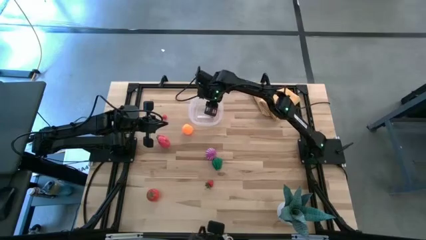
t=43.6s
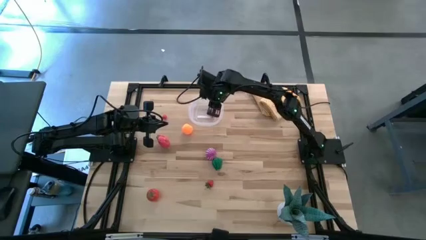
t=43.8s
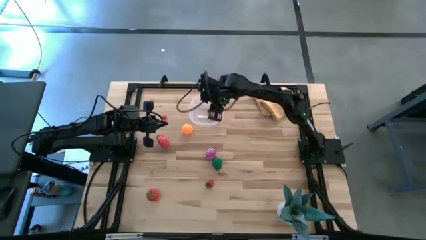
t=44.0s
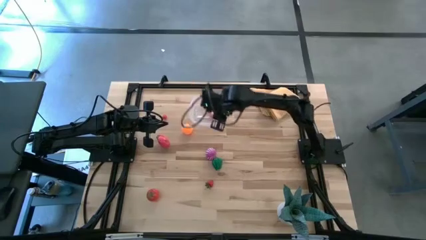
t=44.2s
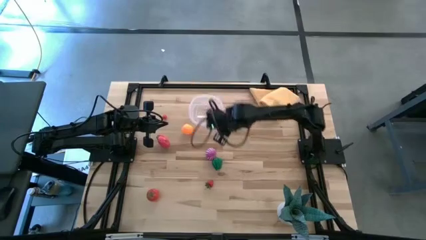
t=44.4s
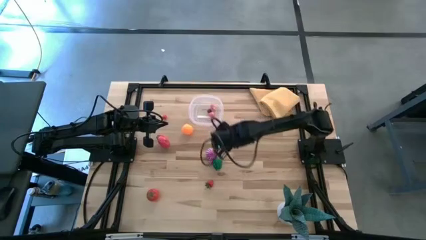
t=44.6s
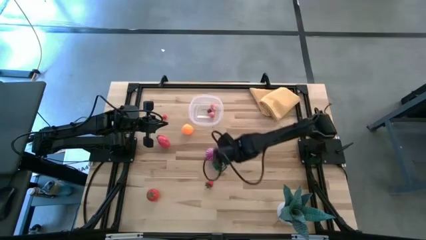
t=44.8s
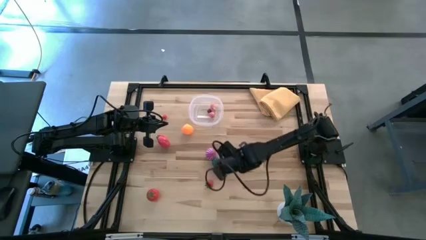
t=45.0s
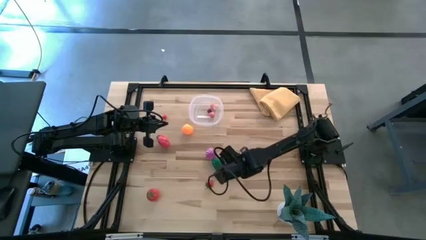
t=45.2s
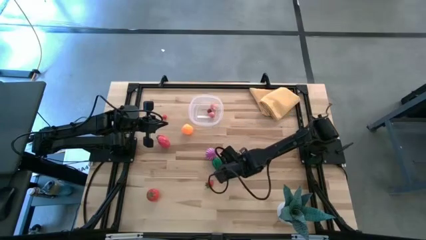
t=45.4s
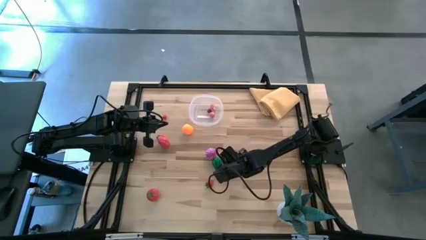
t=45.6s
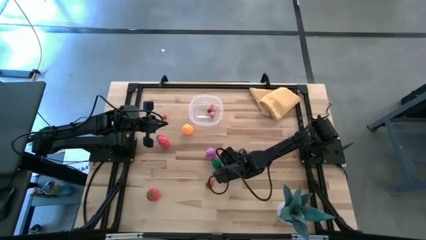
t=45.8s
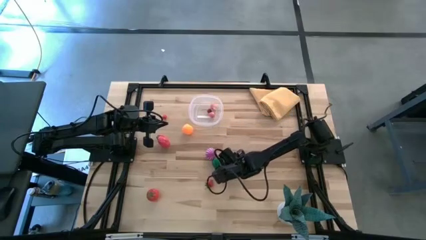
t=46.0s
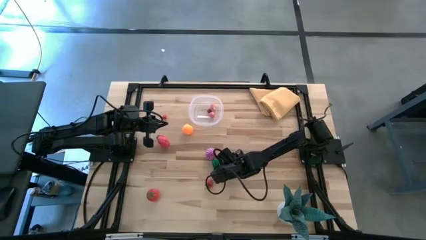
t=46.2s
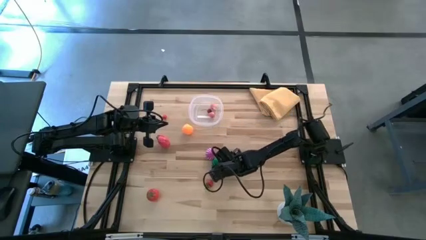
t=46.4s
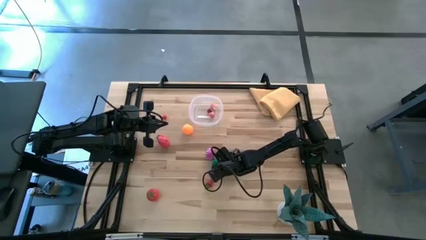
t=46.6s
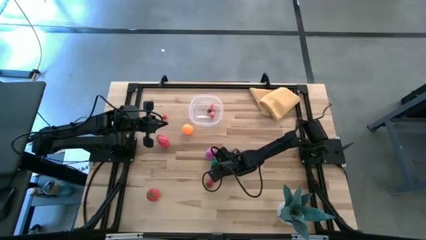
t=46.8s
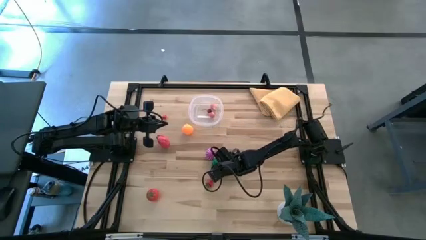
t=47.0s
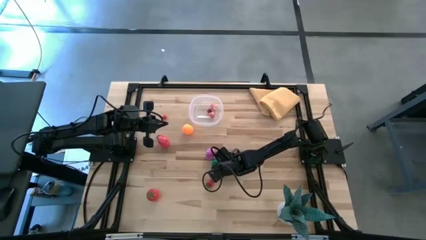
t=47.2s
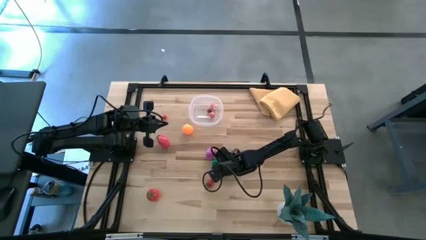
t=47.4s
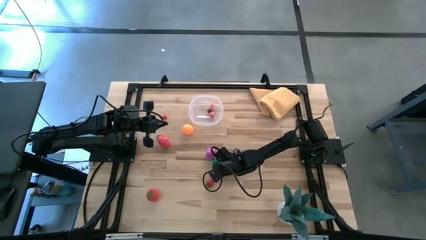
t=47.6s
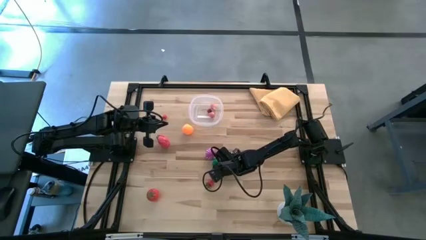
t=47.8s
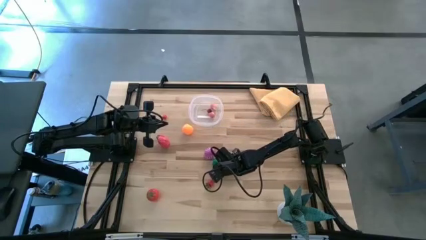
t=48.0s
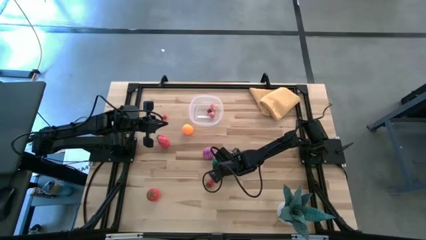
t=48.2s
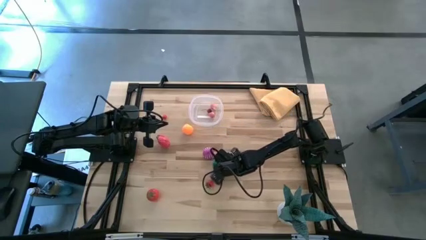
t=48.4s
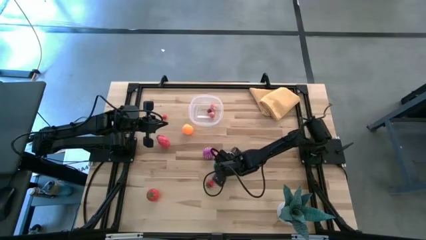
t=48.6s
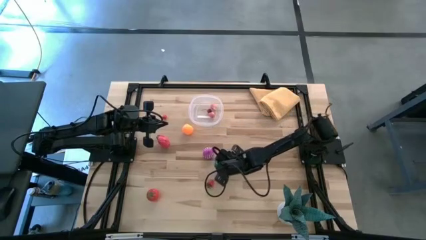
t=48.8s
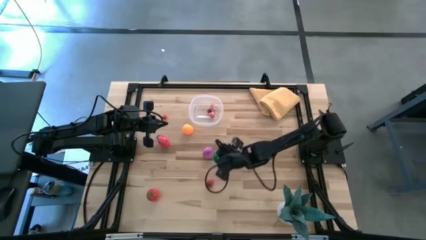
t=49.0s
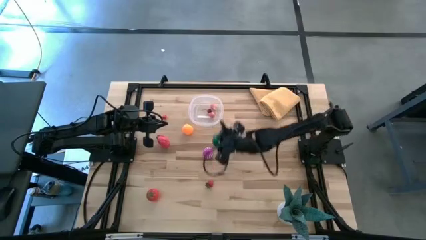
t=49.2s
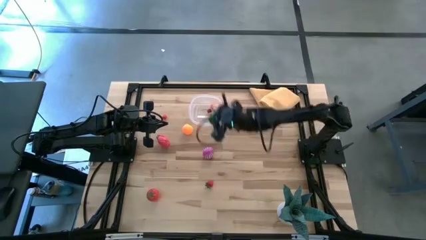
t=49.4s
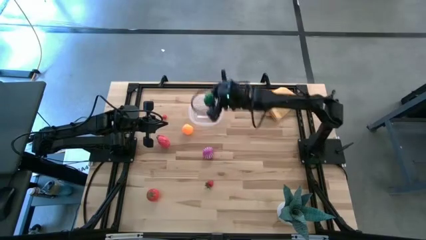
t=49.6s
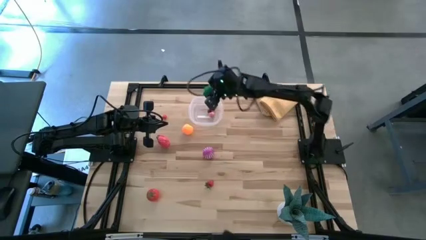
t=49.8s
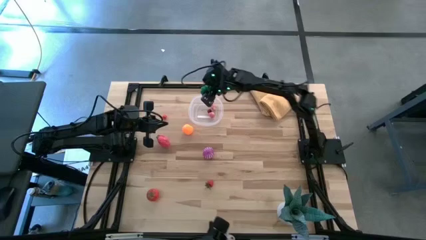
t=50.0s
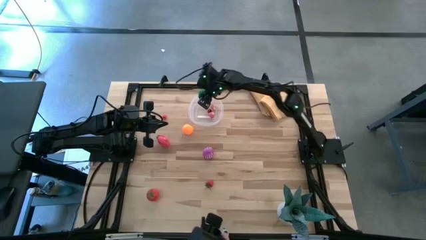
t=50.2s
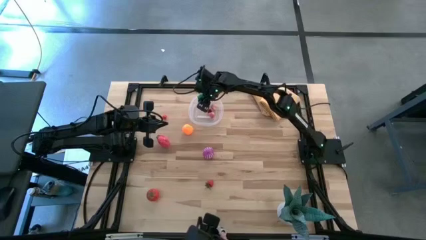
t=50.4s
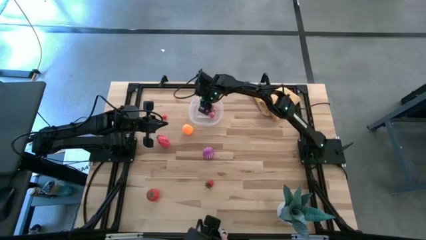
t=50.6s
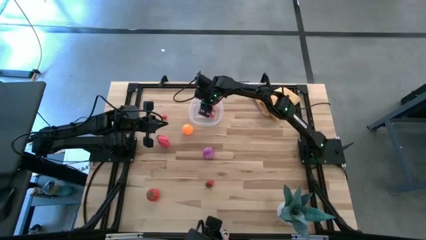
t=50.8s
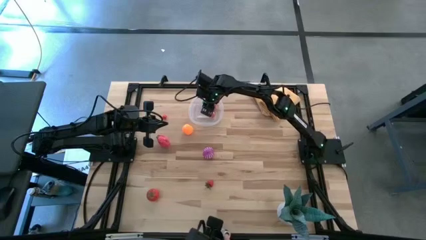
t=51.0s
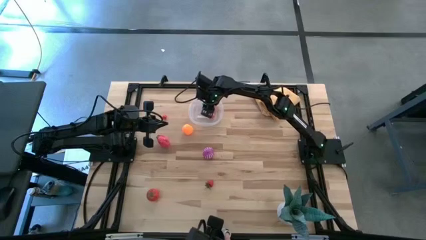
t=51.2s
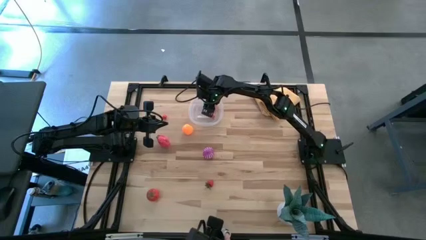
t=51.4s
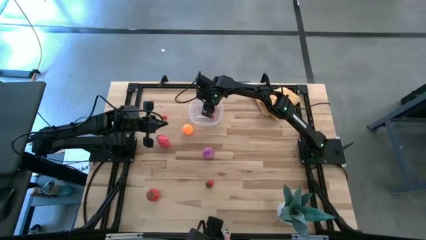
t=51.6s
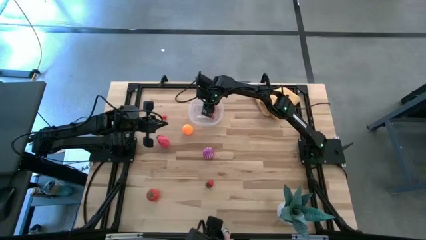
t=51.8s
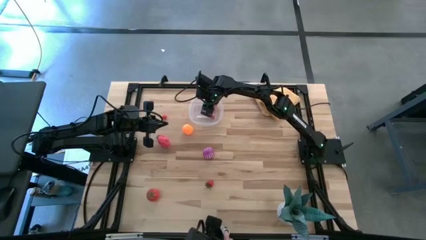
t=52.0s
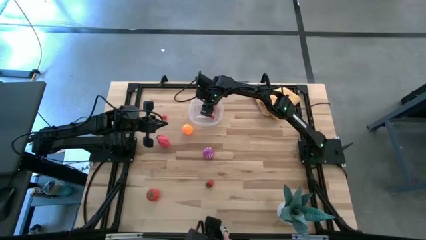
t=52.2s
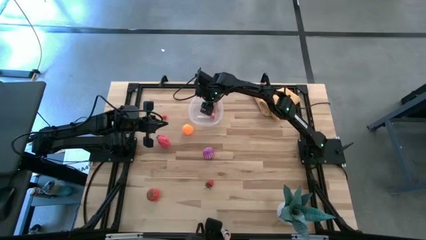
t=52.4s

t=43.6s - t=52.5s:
Task: Pick and placing Produce into tupperware
Put the green bell pepper into the transparent bin

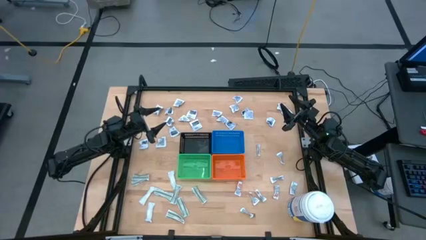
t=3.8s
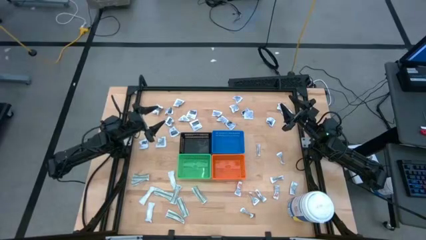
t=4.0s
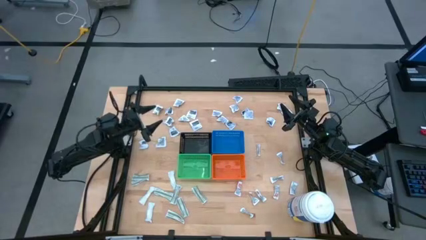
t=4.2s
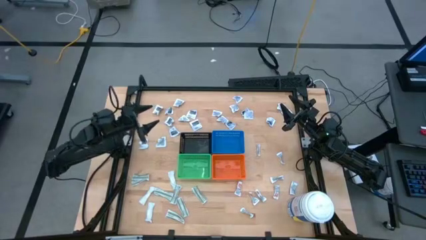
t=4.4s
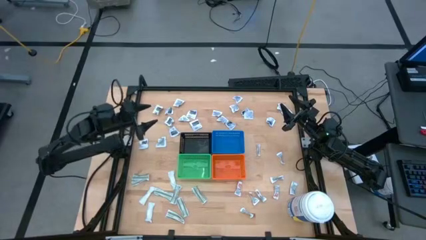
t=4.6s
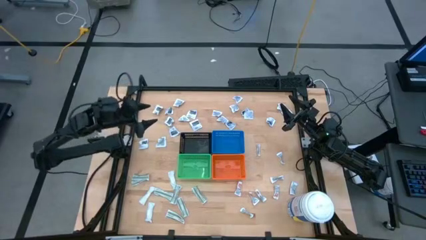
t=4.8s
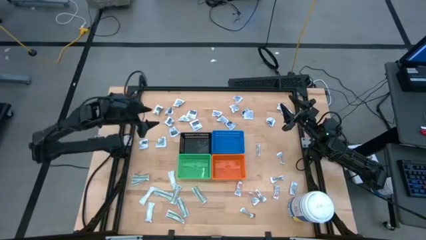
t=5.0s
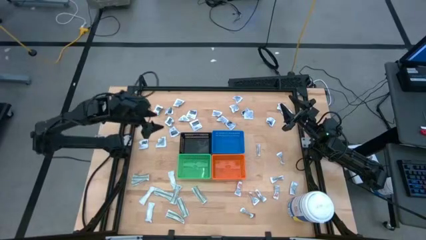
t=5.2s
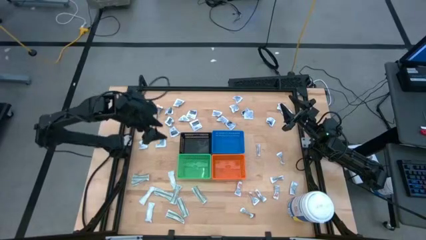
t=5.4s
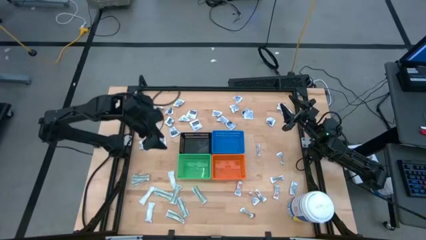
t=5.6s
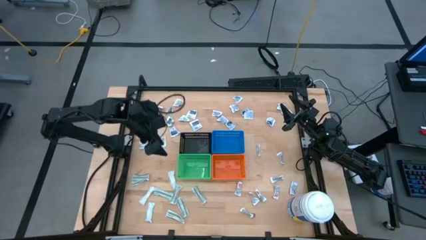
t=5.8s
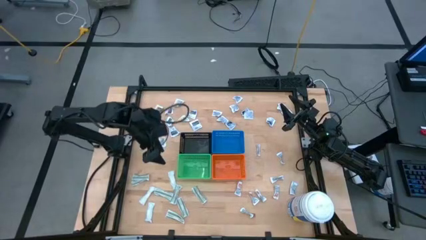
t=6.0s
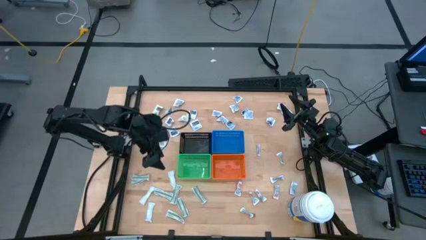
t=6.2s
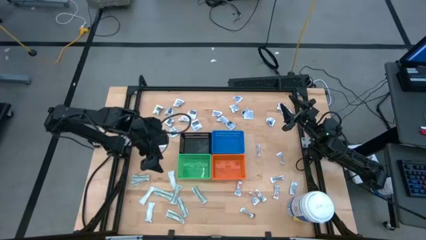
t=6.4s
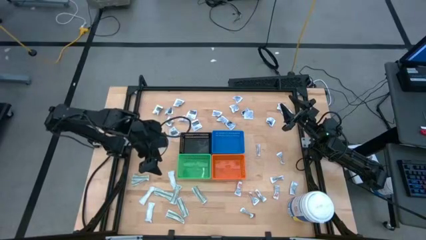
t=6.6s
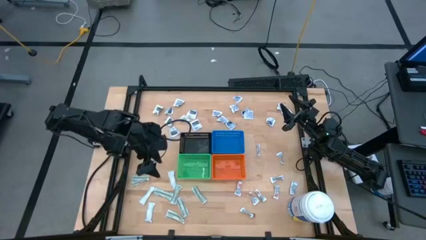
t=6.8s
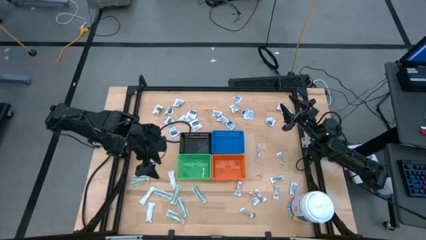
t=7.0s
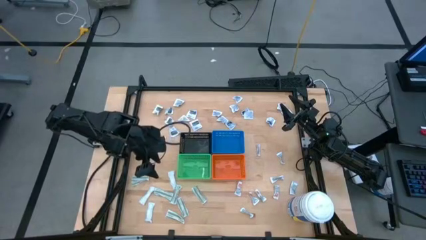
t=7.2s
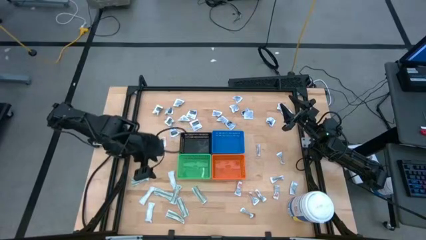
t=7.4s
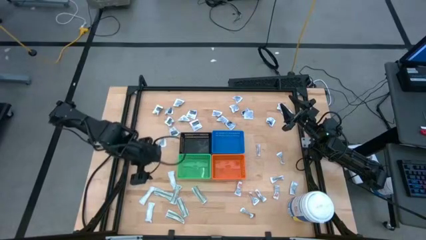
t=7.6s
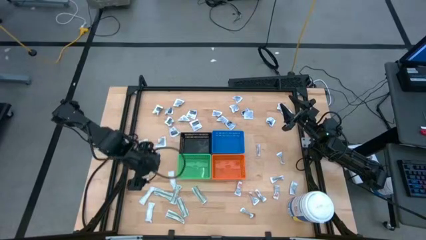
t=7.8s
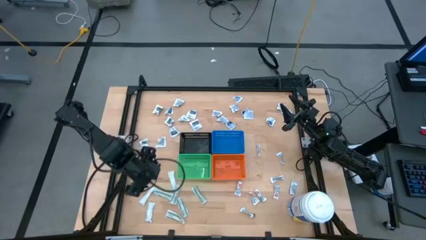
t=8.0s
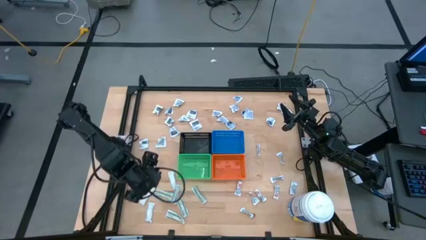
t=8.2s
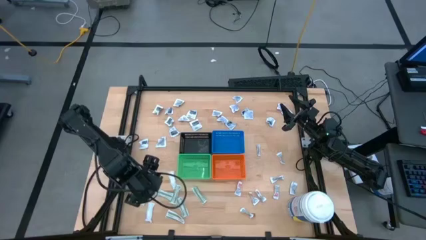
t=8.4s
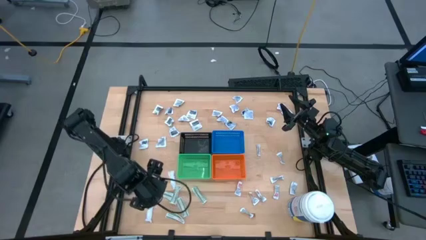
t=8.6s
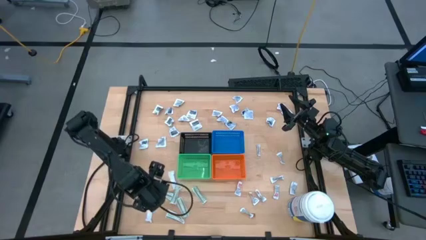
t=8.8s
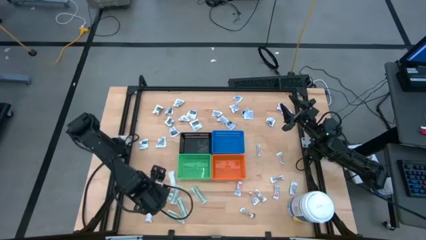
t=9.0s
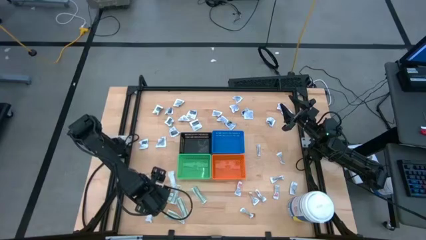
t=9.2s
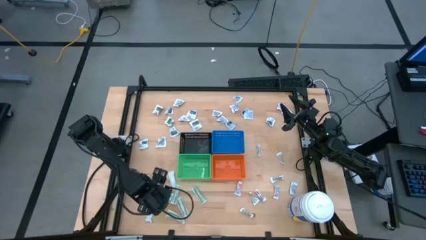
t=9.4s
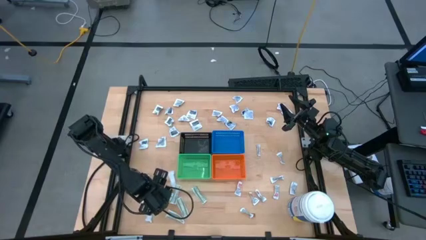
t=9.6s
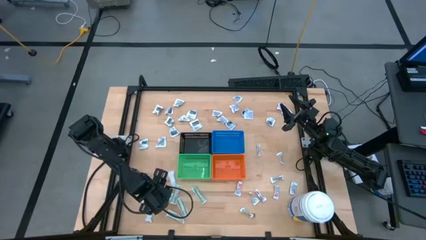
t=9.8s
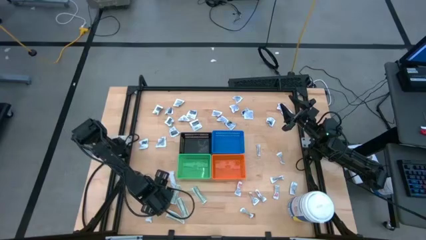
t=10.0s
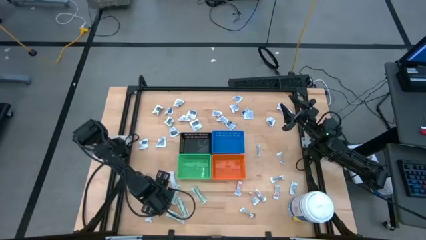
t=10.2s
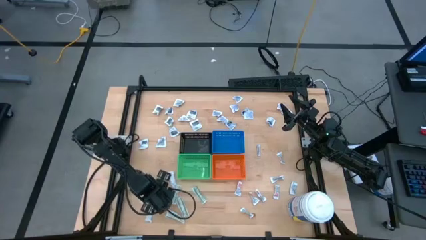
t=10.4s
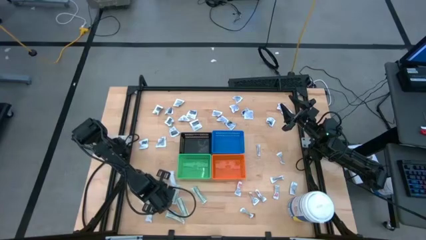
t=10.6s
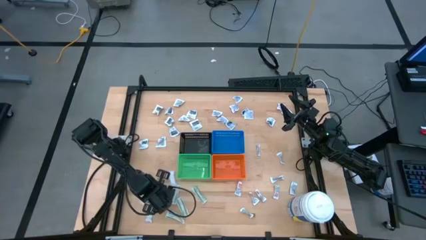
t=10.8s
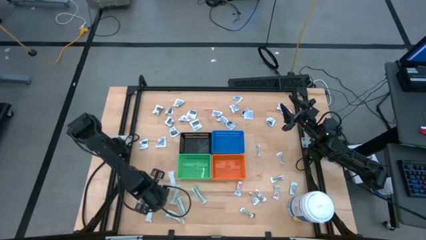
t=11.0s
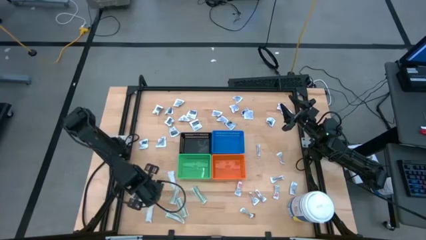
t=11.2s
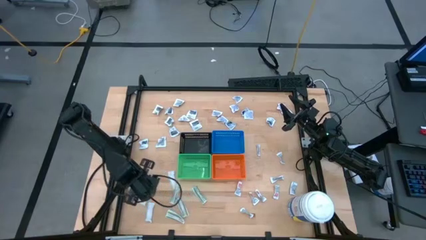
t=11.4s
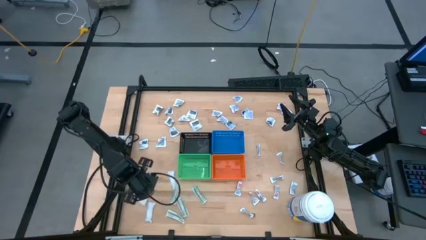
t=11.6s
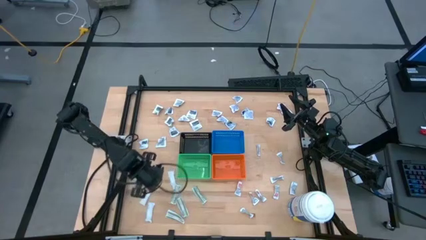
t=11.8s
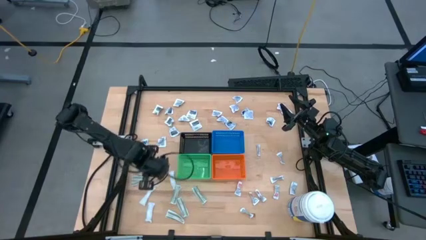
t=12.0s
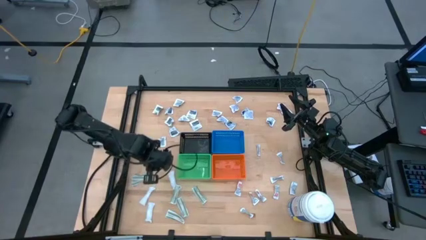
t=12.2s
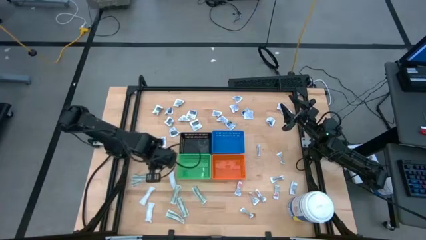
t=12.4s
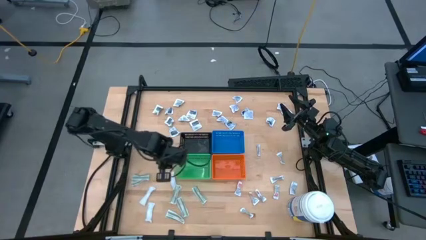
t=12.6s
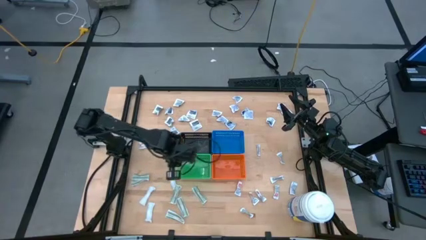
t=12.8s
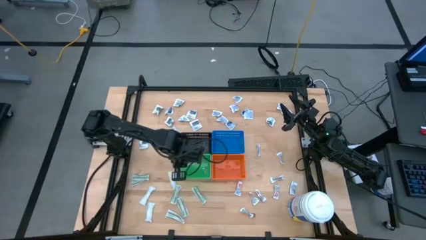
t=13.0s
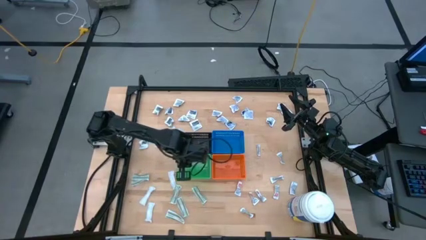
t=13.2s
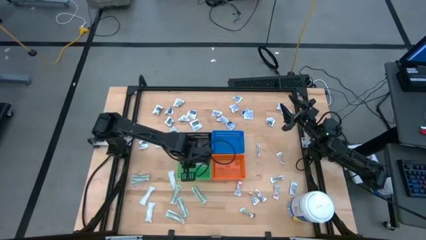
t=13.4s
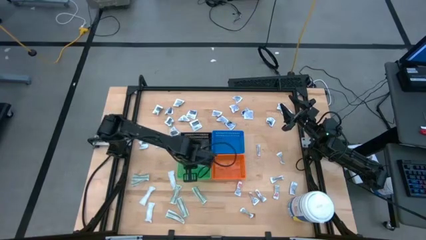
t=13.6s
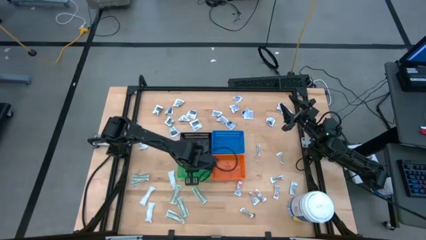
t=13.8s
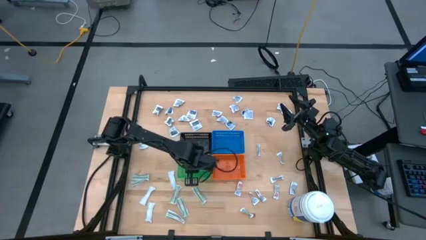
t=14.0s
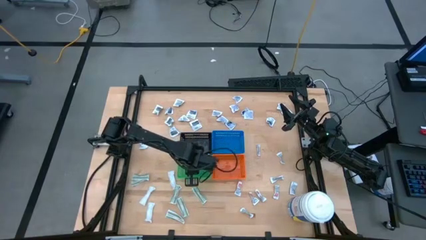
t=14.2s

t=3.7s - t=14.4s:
Task: Pick & Place First Aid Supplies
Put the bandage into the green bin
